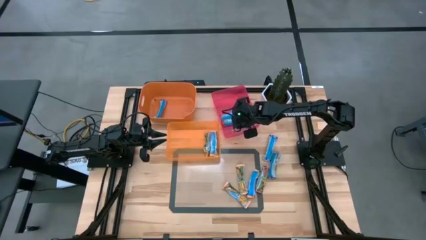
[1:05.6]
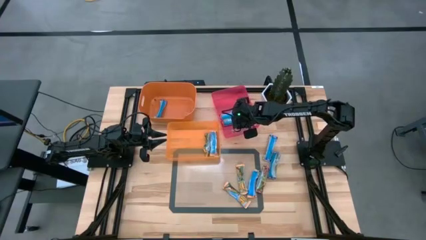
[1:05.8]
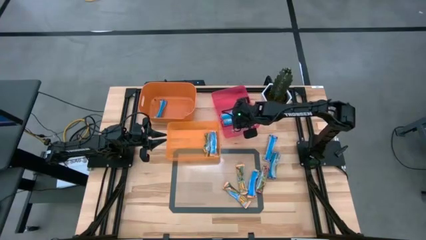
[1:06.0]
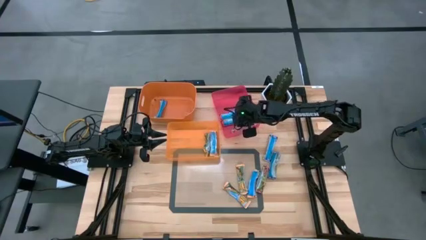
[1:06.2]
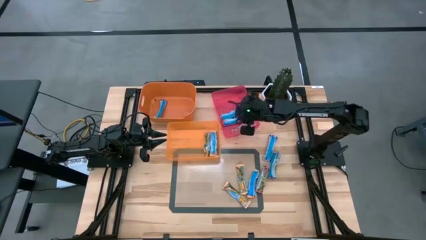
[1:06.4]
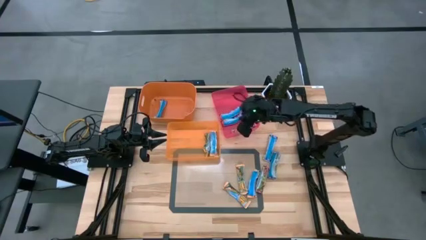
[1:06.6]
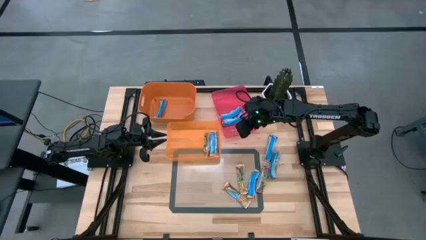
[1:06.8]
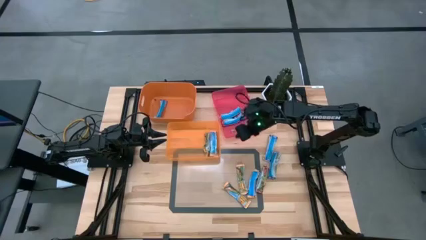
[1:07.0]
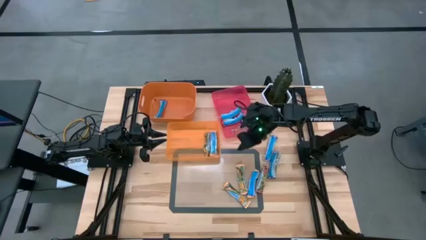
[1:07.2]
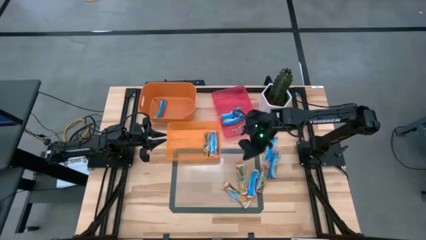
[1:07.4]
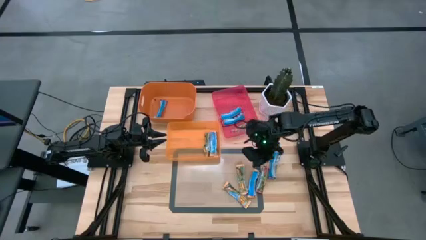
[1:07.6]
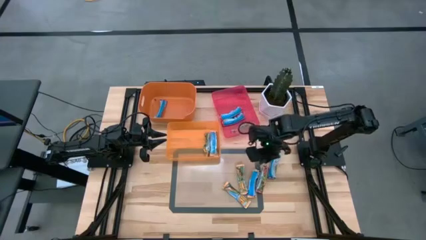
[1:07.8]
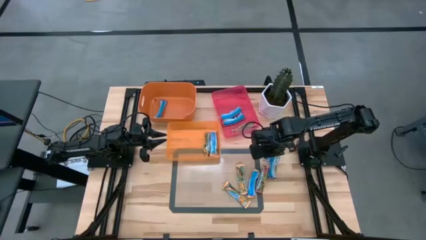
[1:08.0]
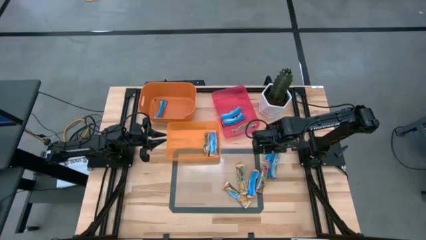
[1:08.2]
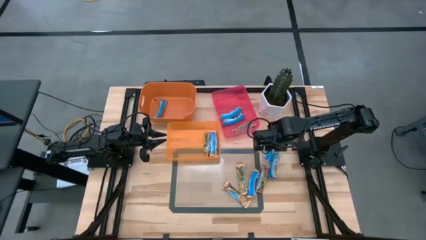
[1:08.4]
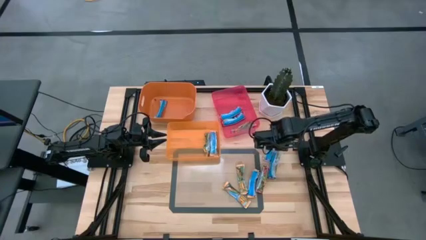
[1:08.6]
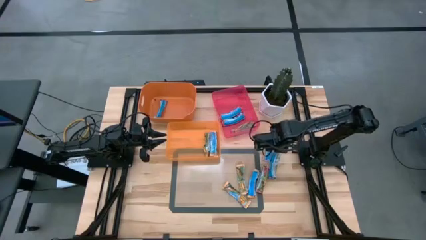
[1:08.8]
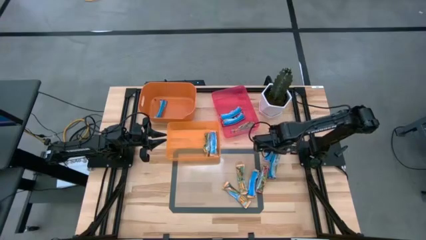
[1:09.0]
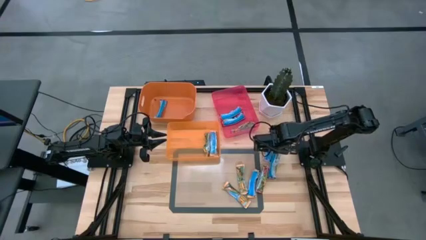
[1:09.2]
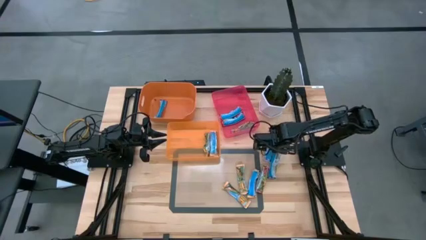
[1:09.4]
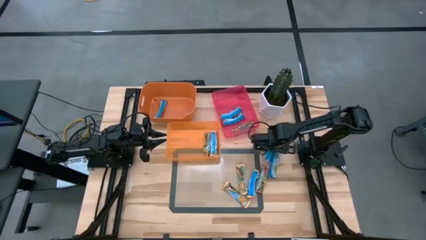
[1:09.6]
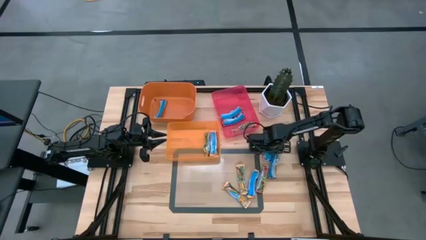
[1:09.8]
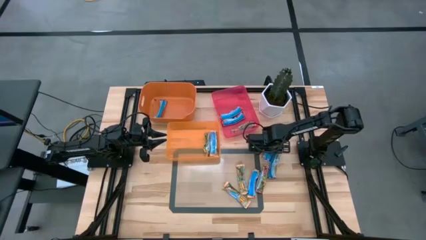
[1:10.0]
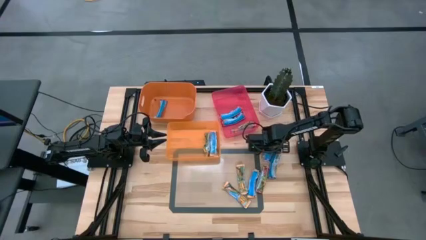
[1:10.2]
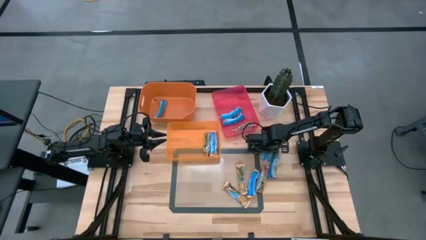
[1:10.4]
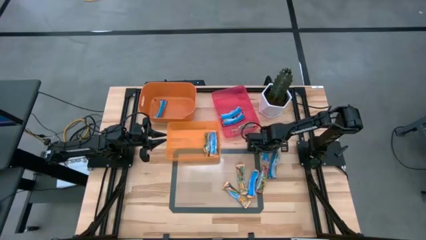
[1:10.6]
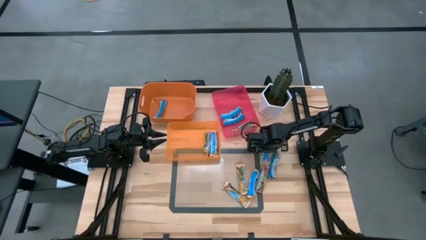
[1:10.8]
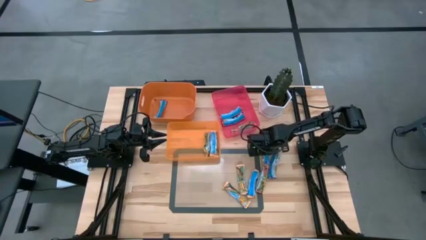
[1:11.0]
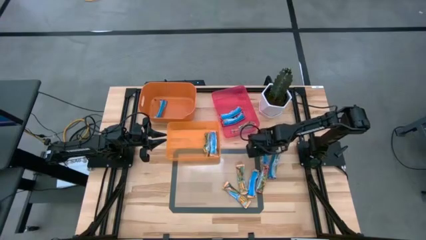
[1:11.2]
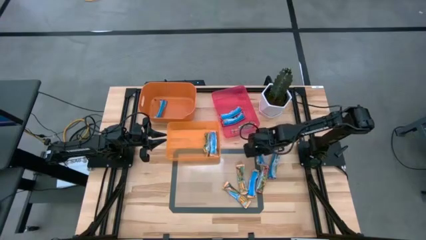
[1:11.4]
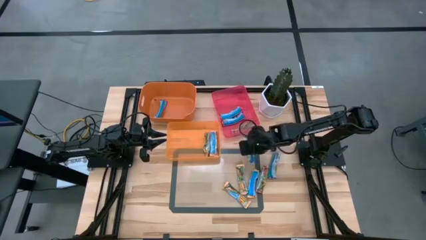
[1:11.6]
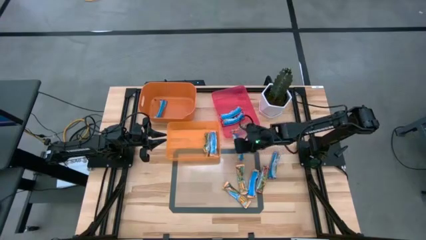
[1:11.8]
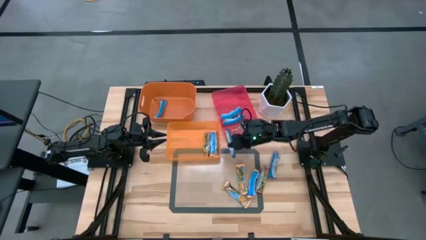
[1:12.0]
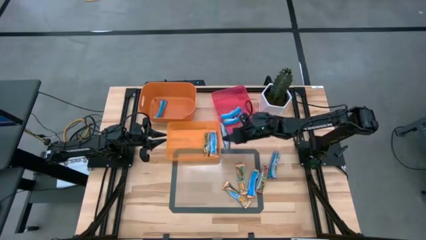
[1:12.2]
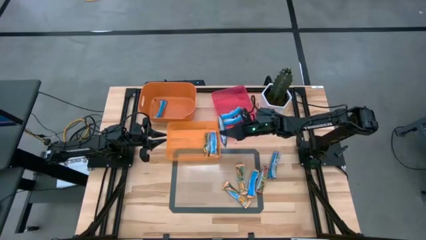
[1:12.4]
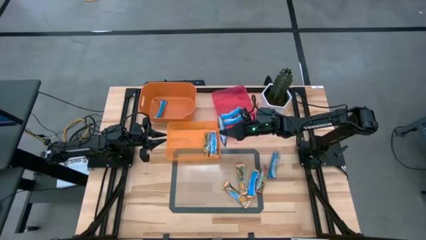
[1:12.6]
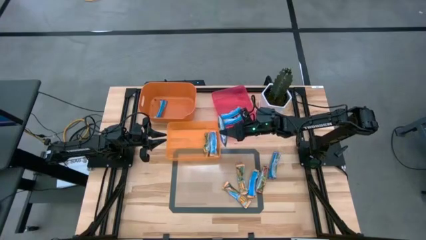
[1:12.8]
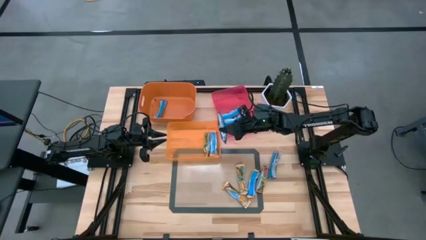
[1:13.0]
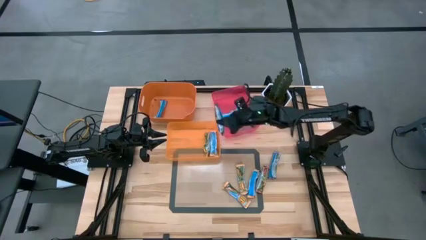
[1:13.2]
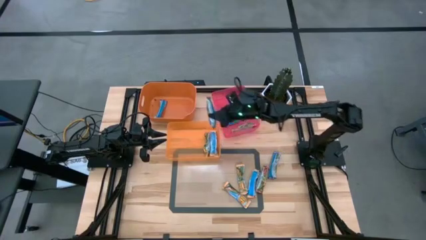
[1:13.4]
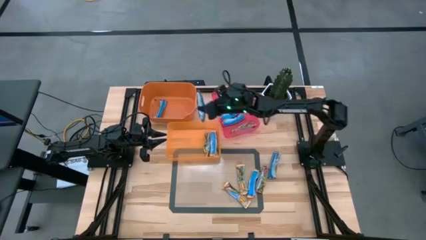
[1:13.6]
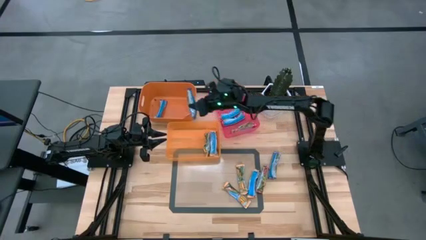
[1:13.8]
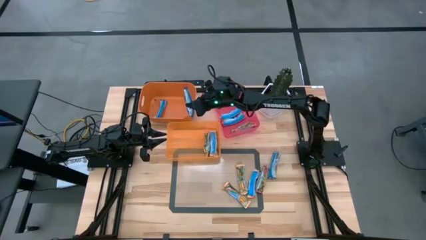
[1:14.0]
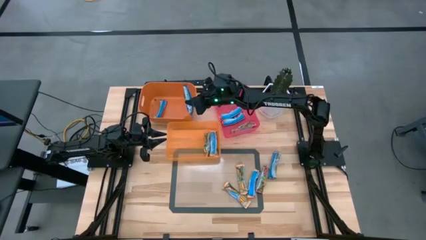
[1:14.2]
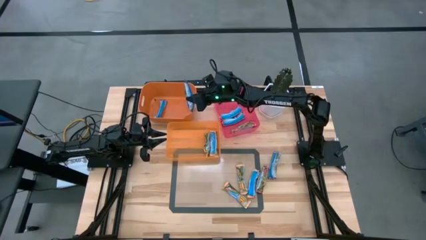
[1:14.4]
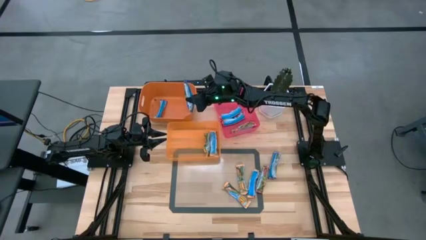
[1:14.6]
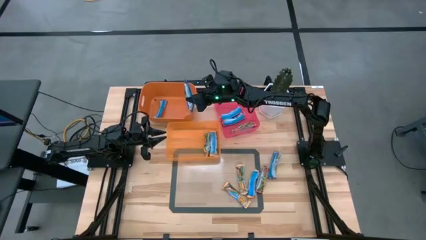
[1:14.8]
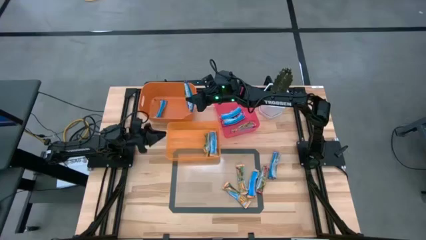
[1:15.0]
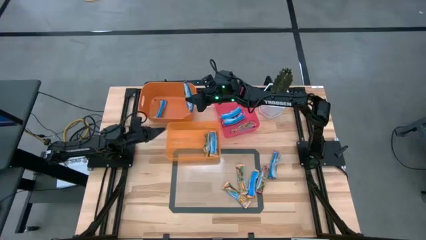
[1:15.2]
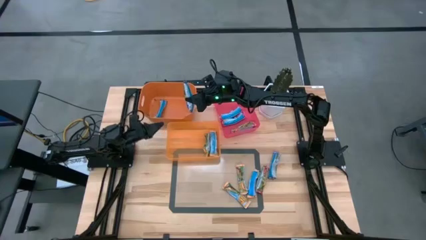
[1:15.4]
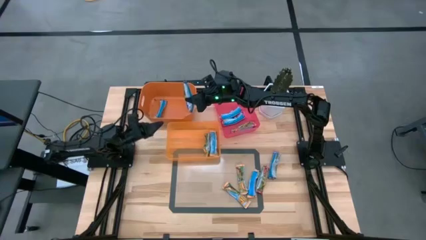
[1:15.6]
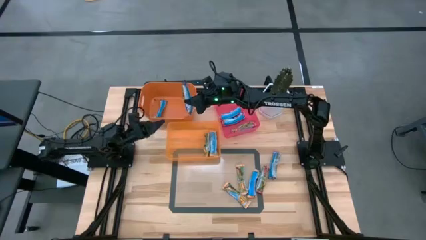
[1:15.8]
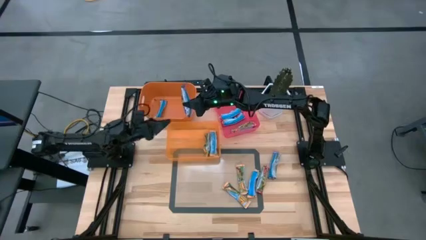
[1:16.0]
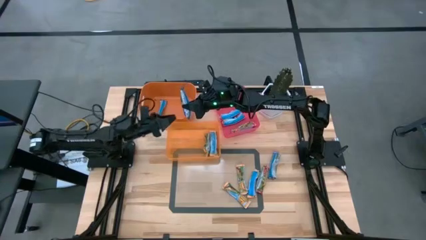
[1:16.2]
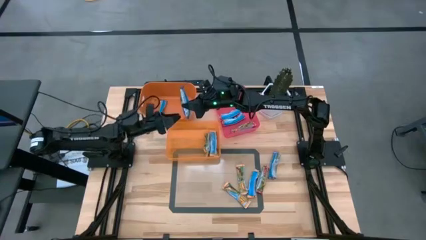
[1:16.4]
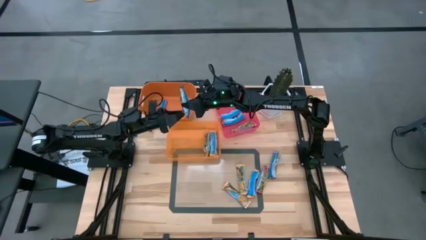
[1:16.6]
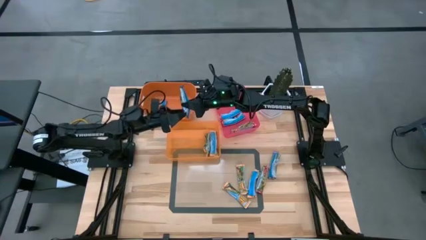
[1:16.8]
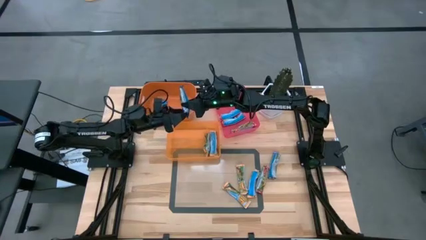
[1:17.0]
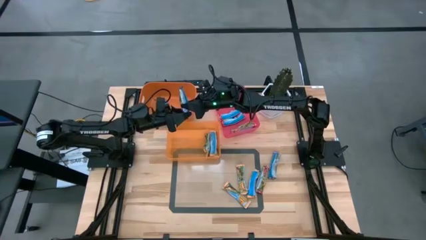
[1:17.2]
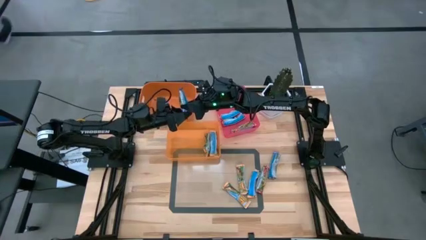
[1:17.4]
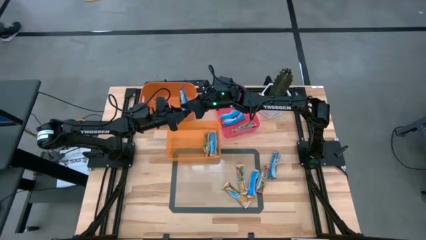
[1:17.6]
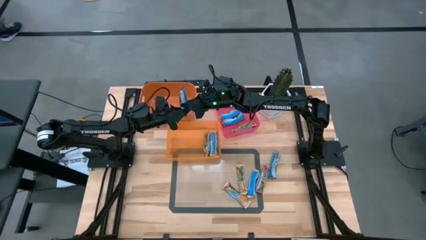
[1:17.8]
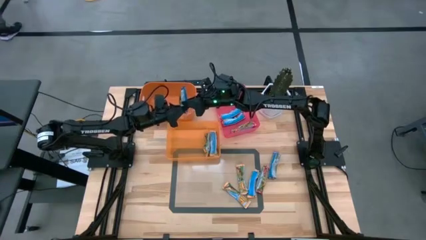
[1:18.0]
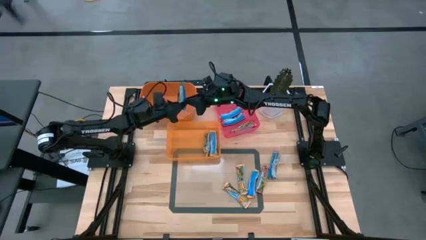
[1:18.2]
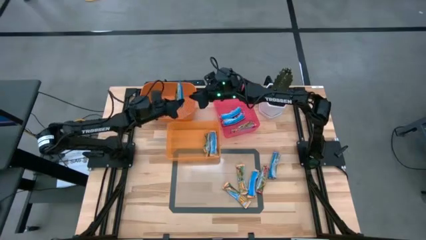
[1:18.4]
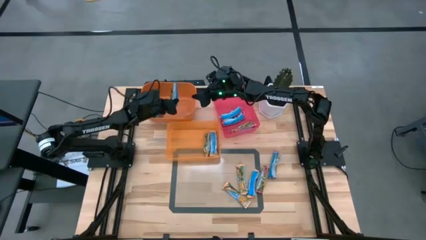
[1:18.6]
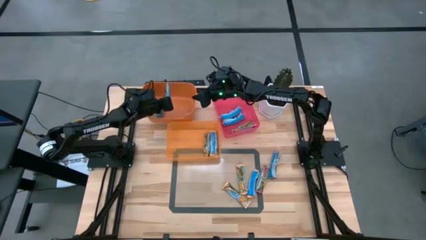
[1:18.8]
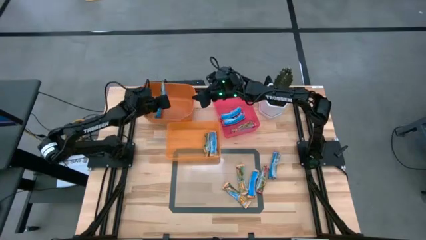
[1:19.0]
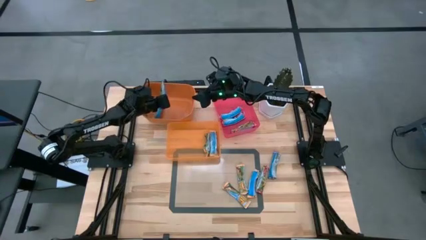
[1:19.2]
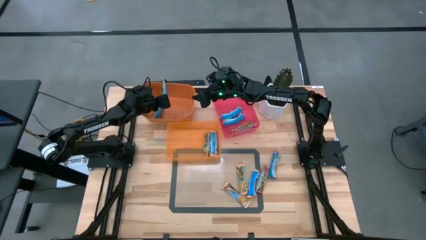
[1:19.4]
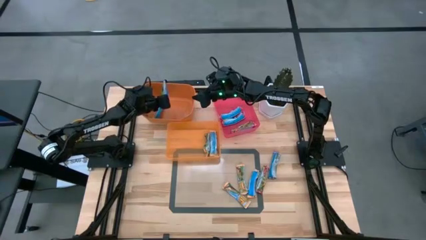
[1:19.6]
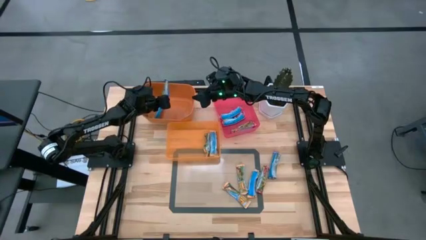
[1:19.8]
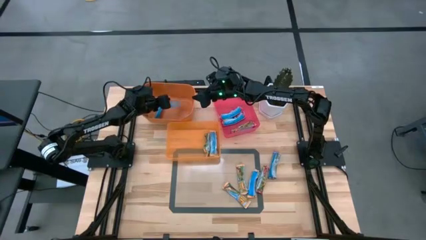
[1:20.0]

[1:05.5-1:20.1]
Task: Pick and place Granola Bars by type
Put the blue granola bar into the top orange bin
